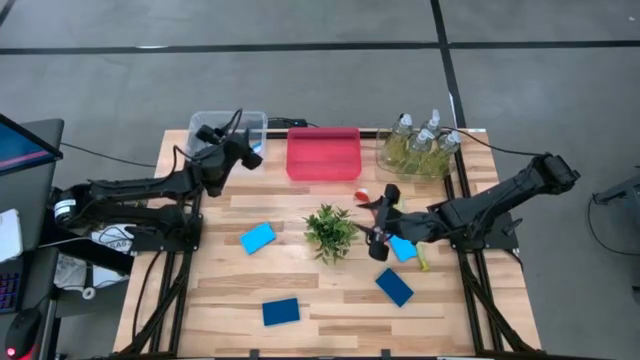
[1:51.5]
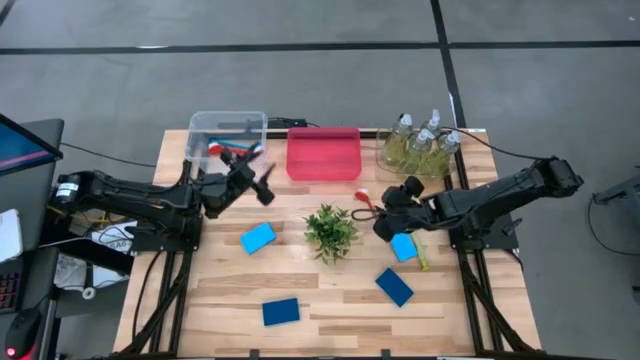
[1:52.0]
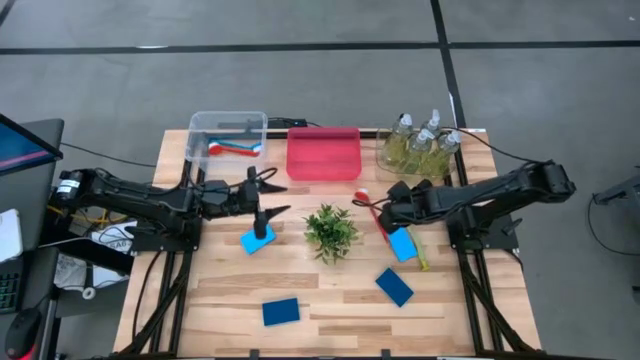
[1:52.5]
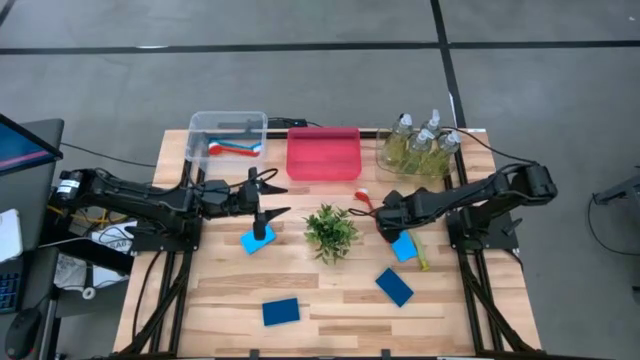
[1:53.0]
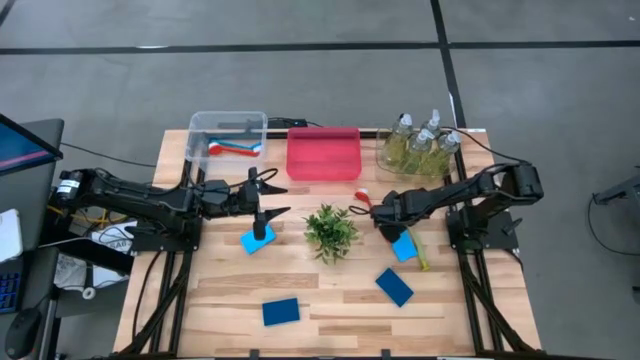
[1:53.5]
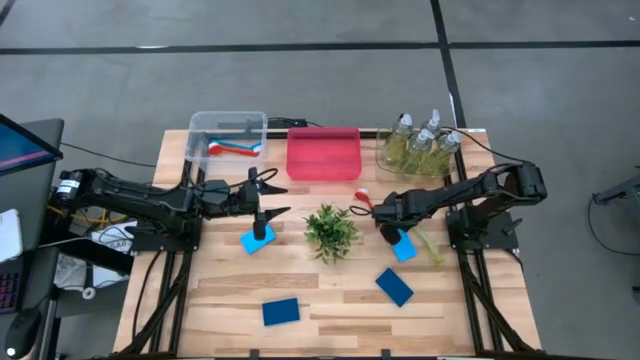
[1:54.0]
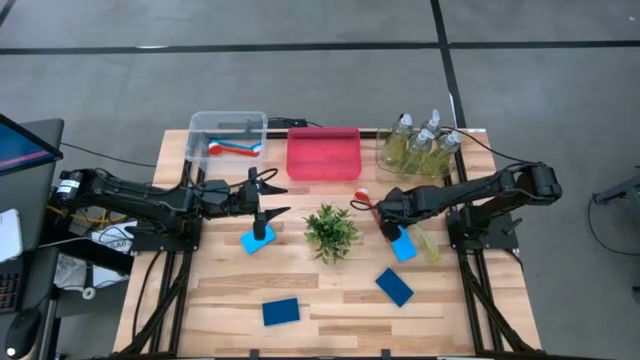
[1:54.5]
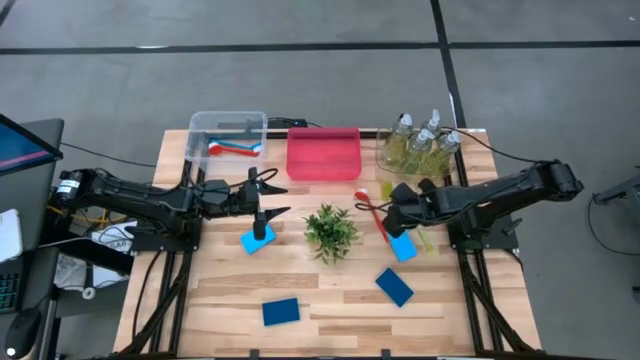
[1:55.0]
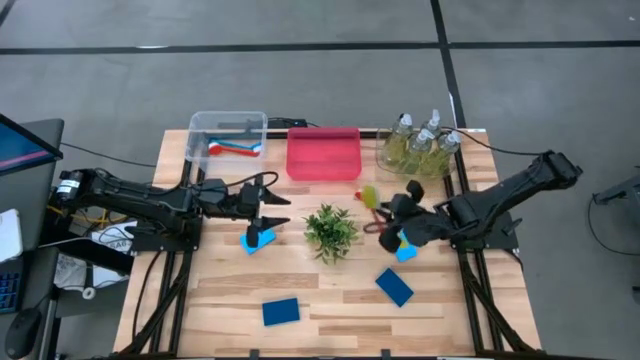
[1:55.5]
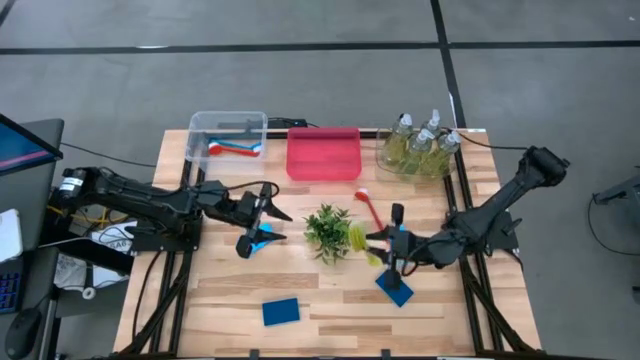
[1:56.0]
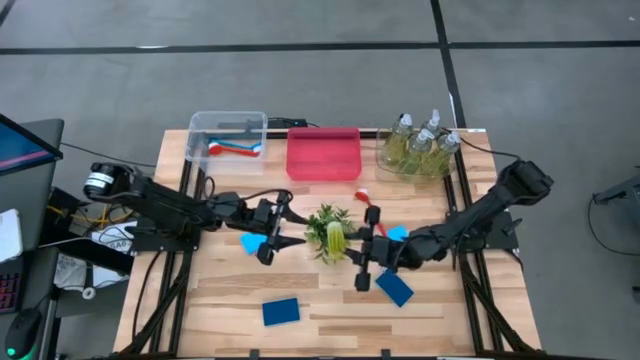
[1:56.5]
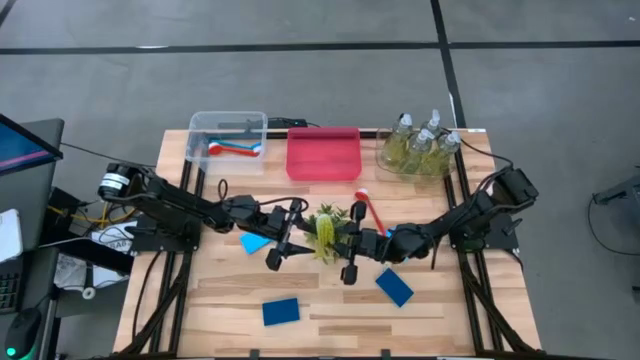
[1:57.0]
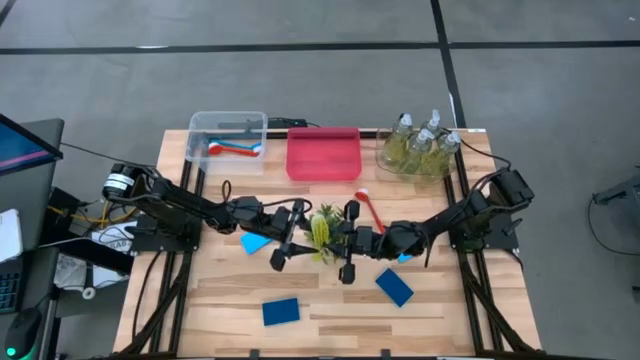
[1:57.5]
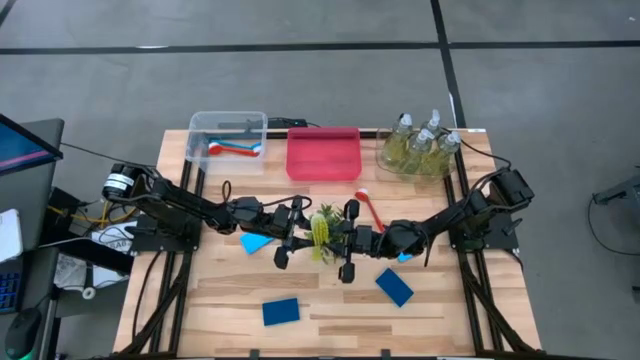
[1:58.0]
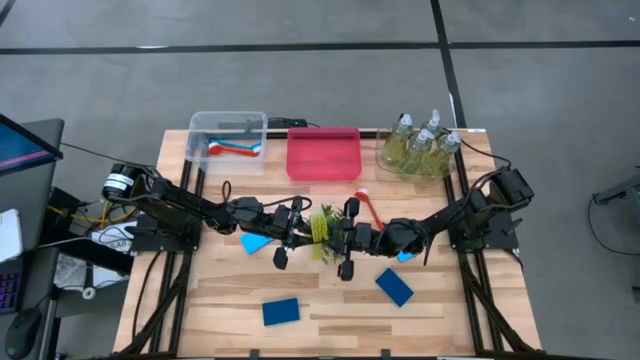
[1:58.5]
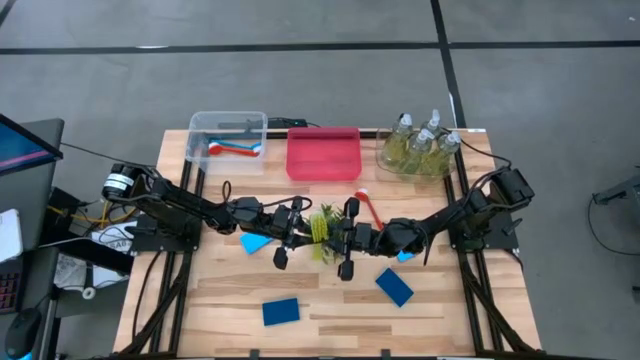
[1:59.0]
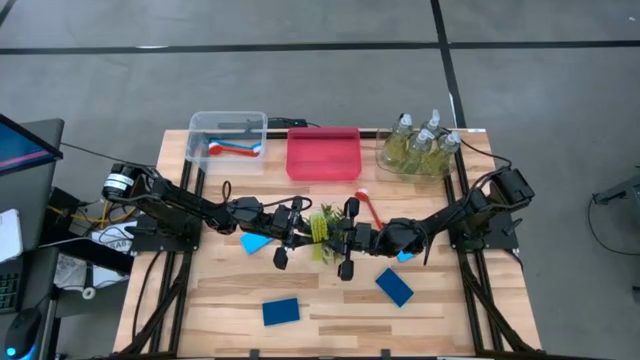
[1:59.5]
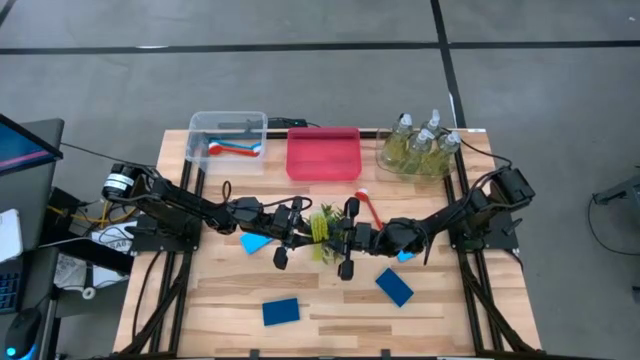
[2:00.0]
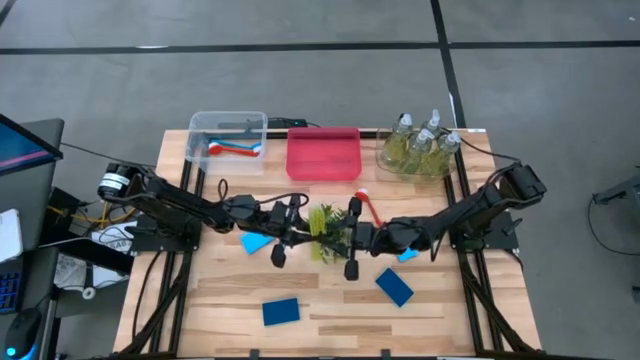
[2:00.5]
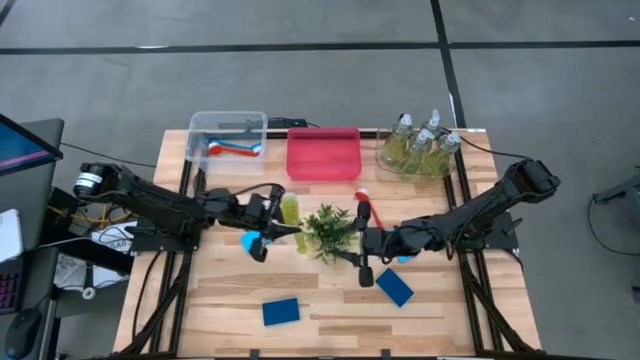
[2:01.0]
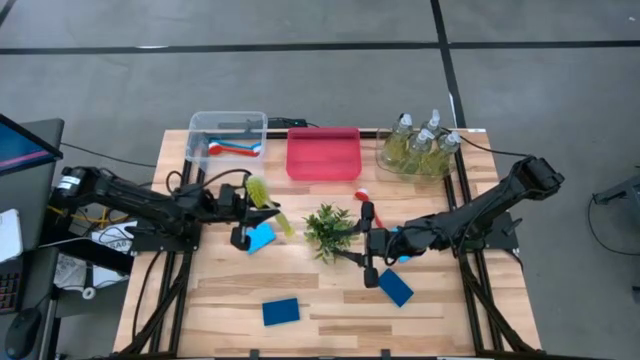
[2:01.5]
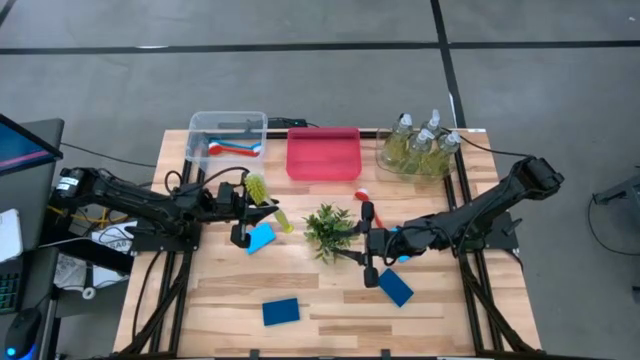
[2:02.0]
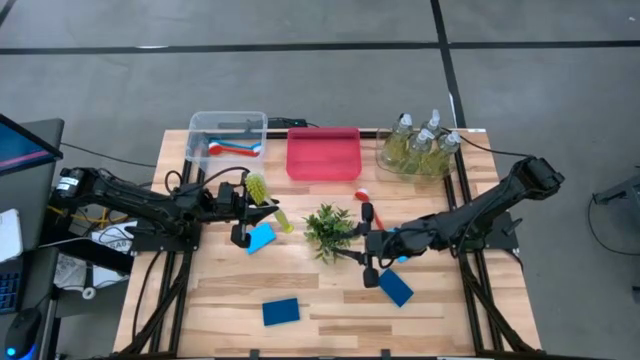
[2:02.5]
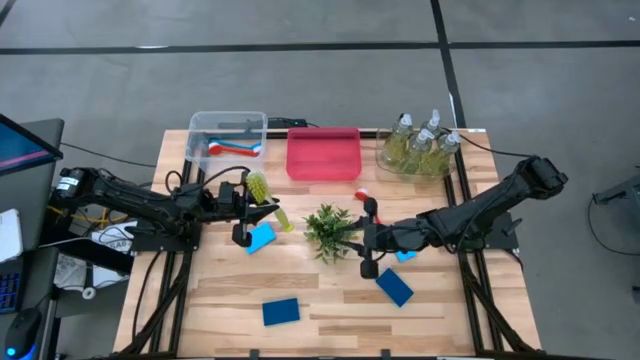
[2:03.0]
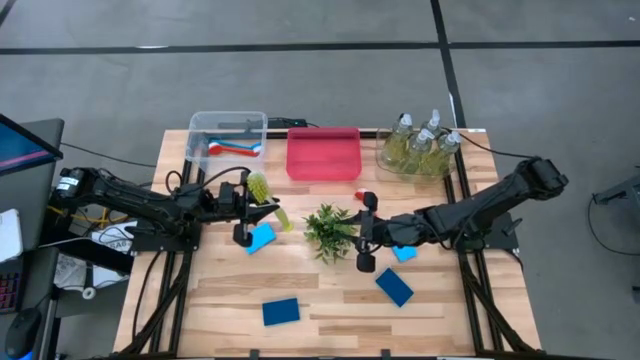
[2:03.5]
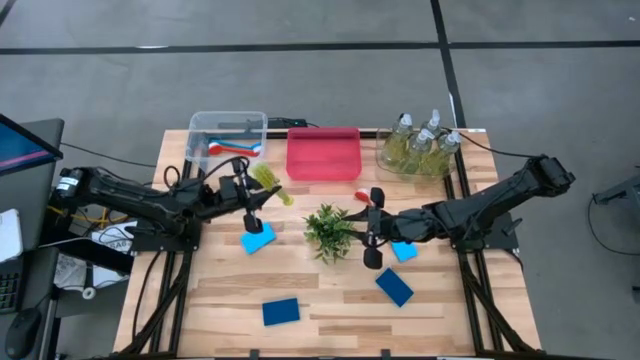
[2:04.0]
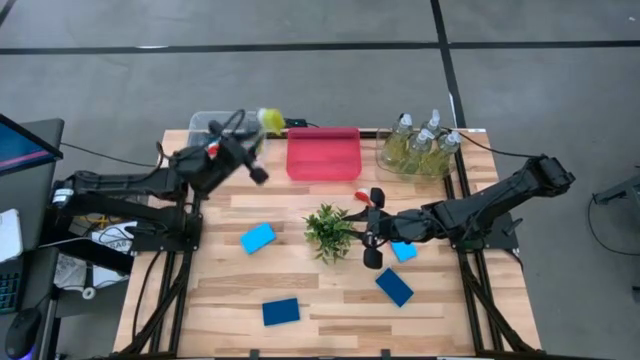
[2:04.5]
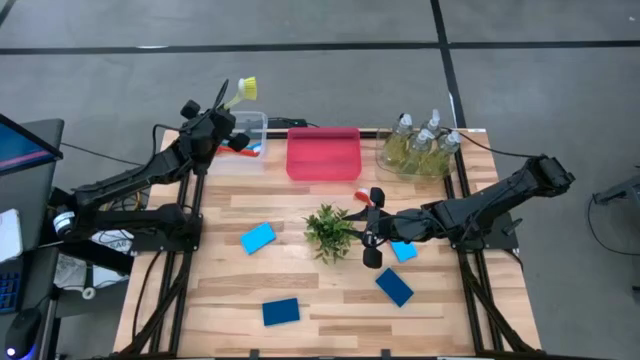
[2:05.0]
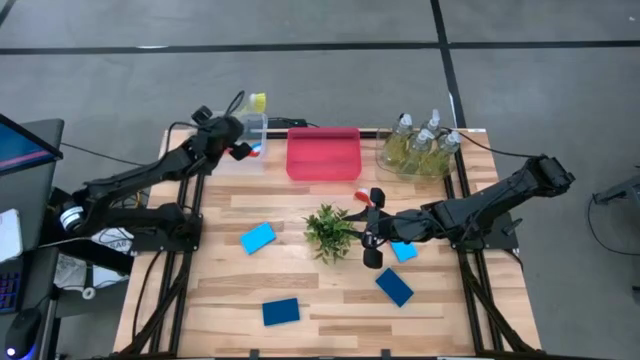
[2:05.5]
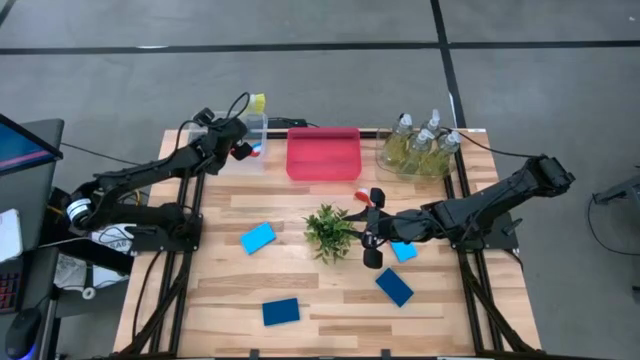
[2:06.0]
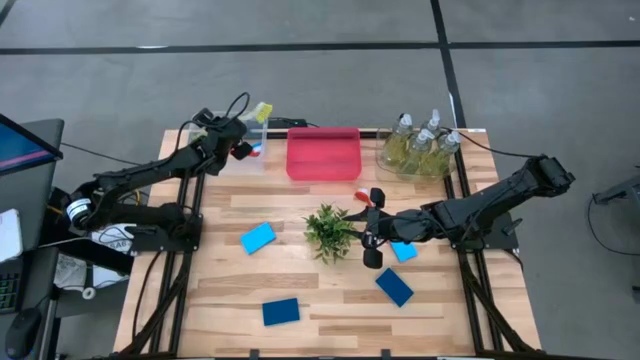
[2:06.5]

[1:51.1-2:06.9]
Task: Pick & Place Kitchen Sink Supplies
Put the green dish brush into the left transparent bin

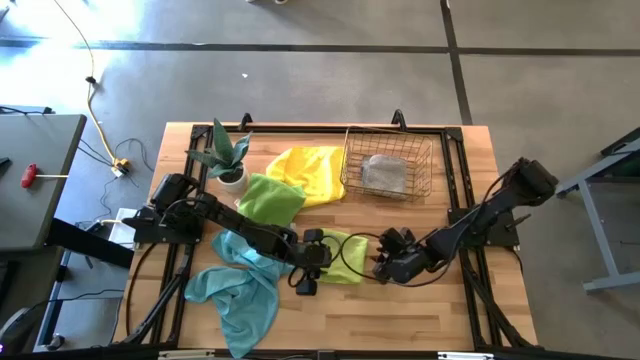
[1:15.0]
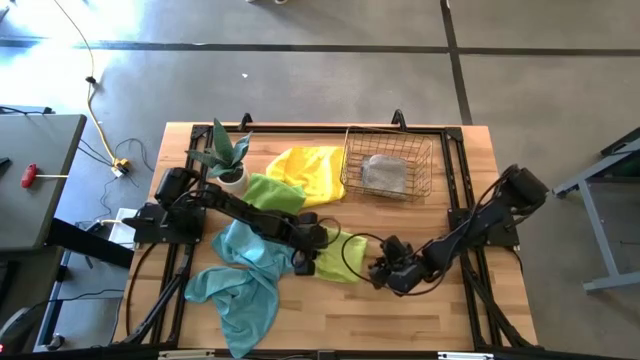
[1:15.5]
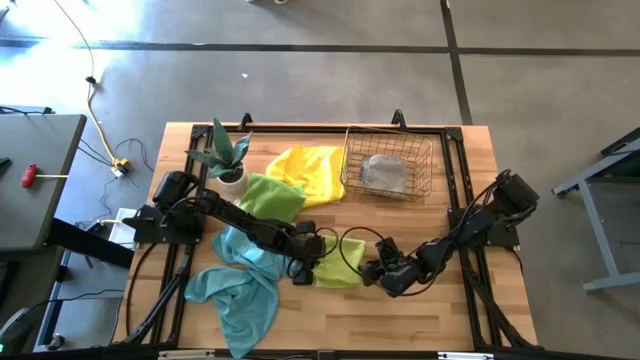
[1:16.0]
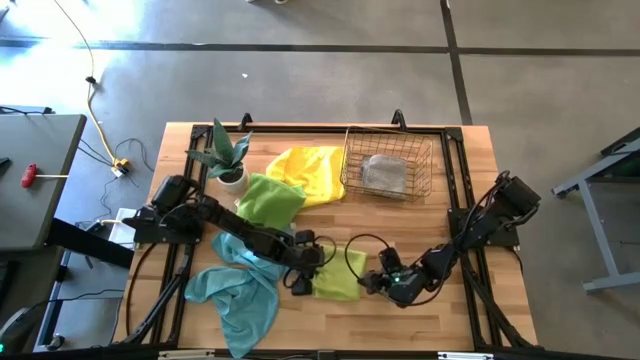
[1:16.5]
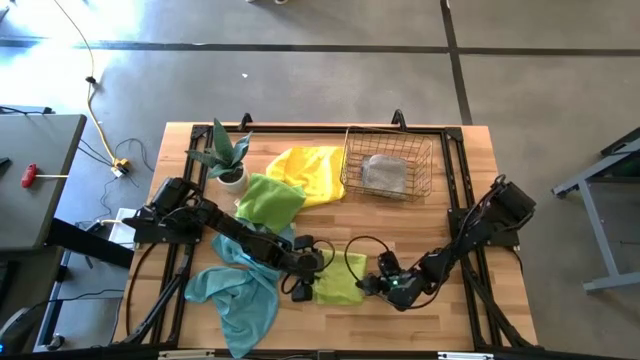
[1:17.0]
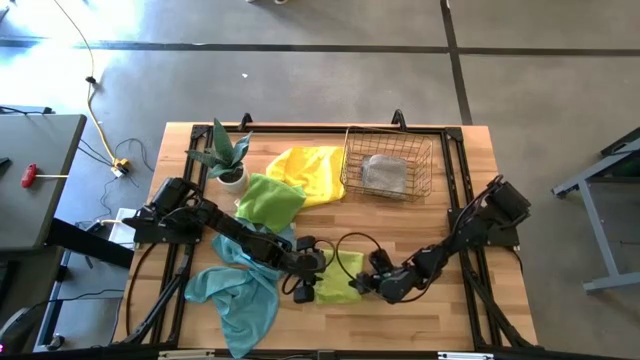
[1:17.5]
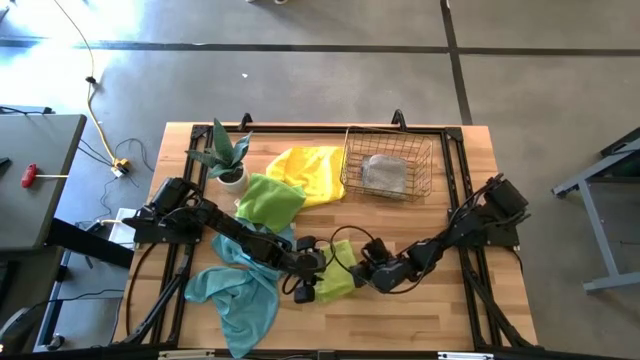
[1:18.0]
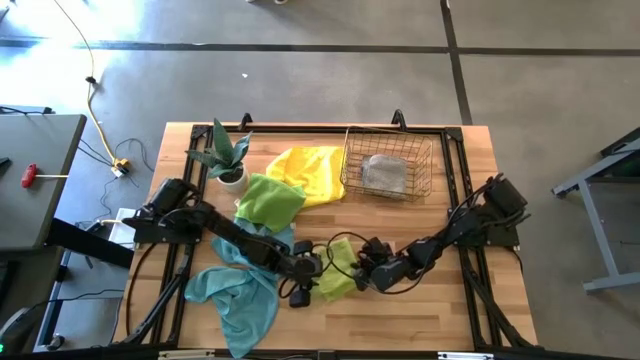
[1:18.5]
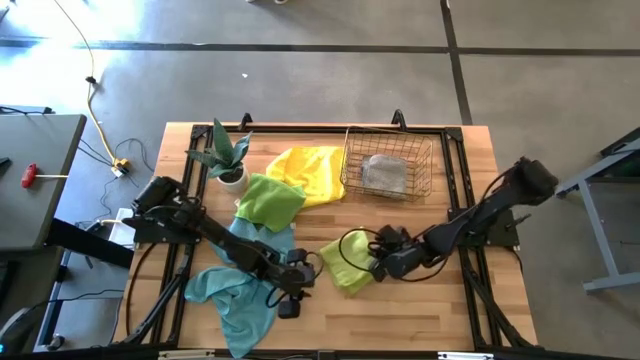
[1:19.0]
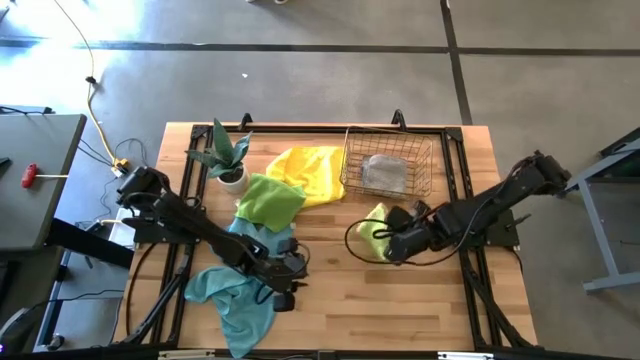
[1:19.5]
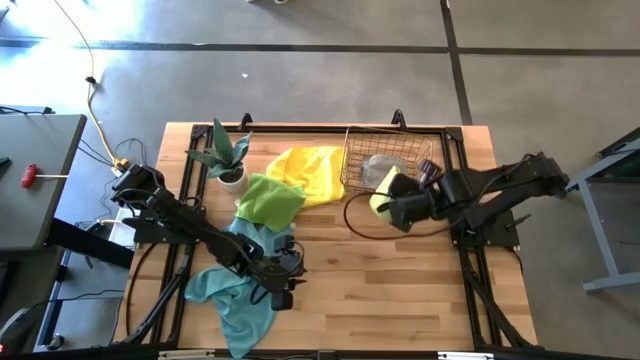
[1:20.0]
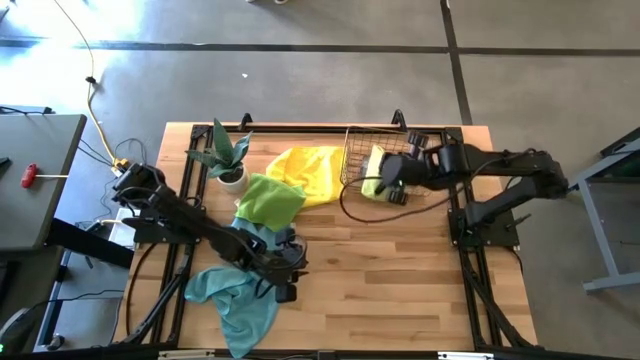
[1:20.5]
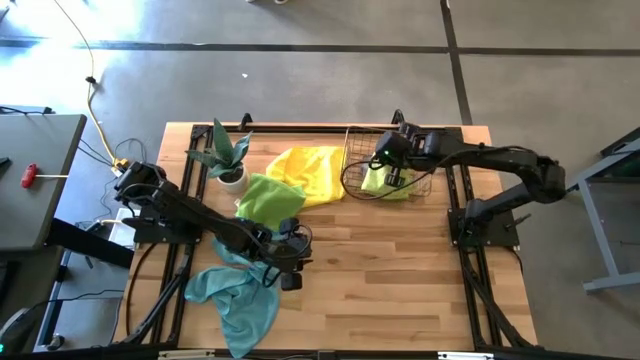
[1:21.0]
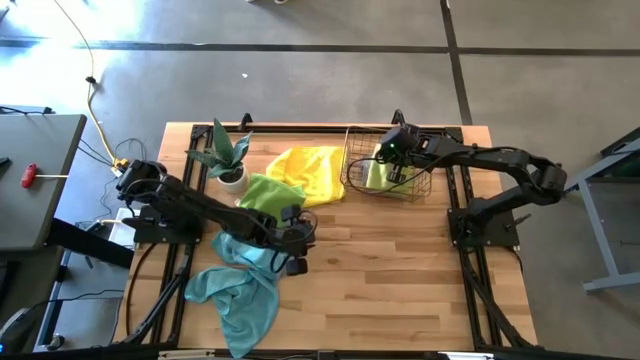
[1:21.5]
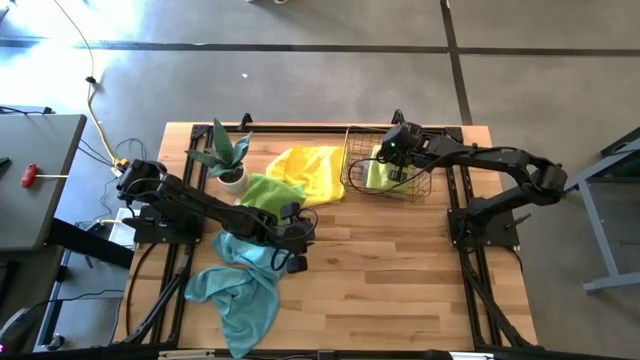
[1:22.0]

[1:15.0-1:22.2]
Task: Fold microfiber towels
Put the light green microfiber towel into the wire basket
